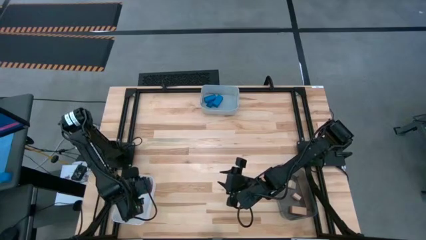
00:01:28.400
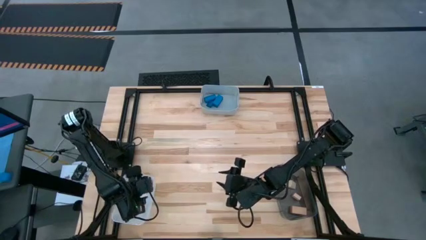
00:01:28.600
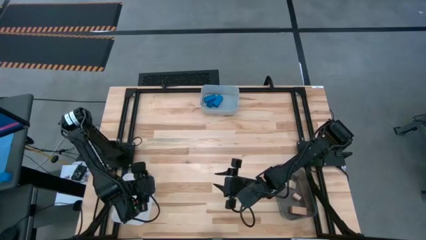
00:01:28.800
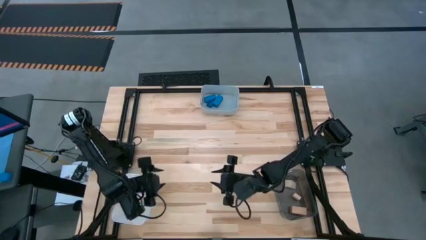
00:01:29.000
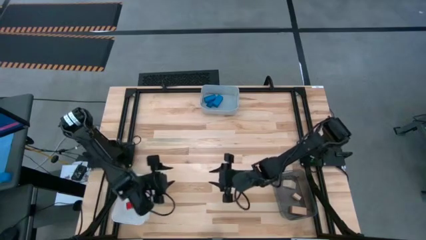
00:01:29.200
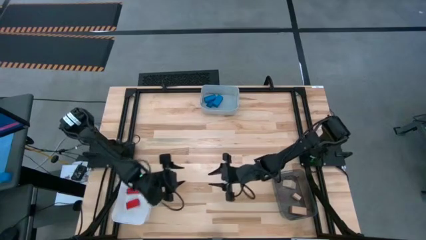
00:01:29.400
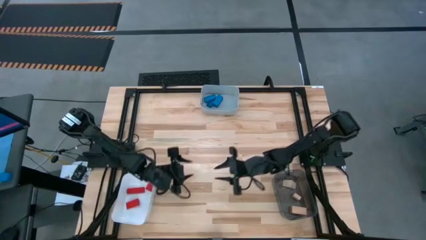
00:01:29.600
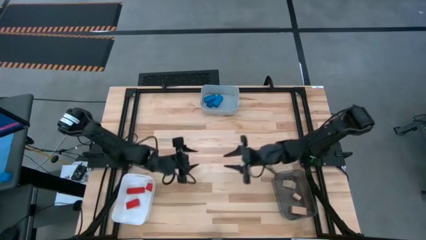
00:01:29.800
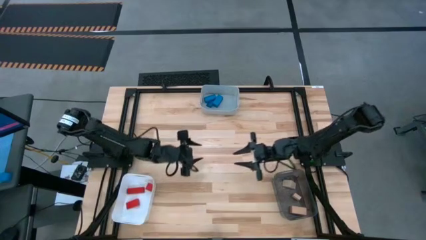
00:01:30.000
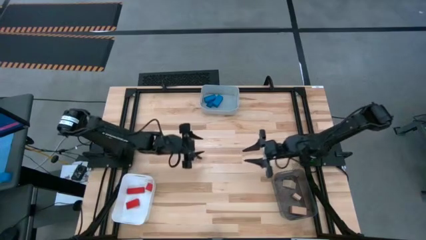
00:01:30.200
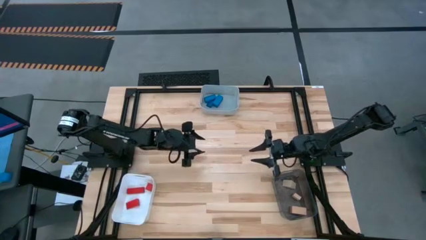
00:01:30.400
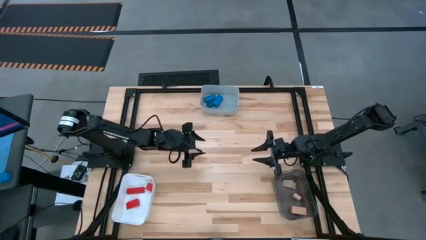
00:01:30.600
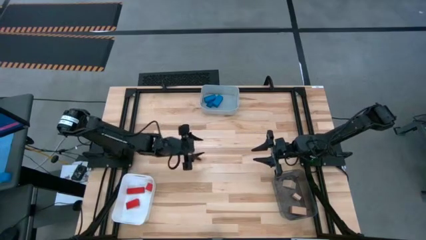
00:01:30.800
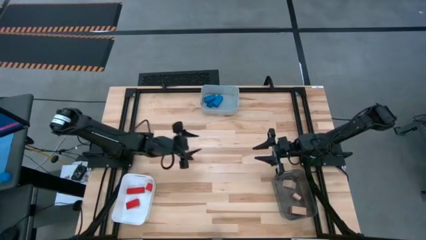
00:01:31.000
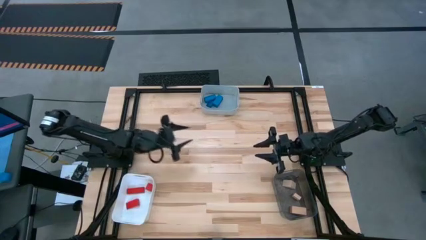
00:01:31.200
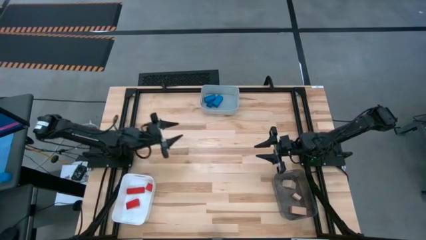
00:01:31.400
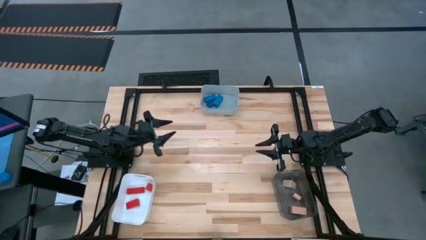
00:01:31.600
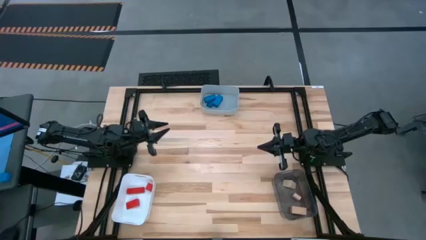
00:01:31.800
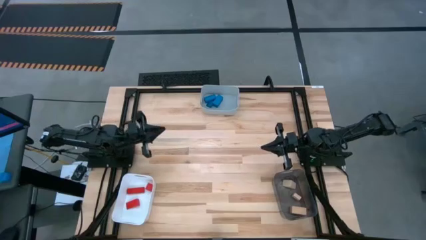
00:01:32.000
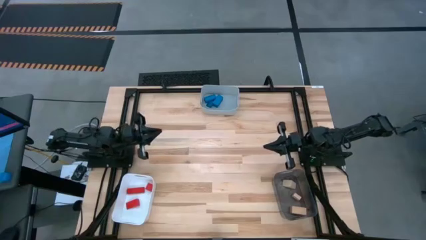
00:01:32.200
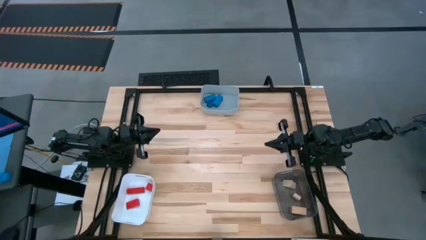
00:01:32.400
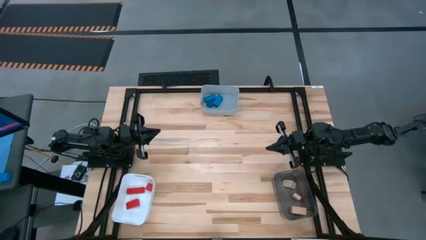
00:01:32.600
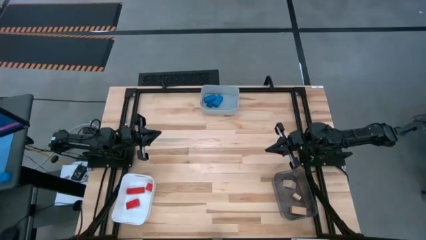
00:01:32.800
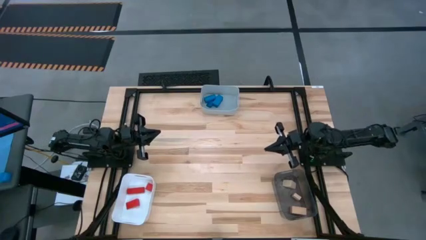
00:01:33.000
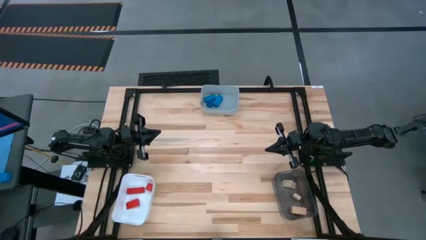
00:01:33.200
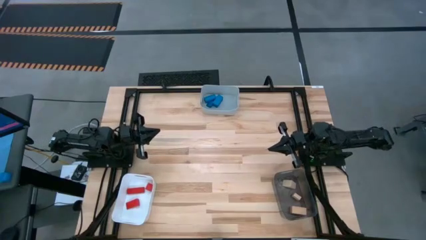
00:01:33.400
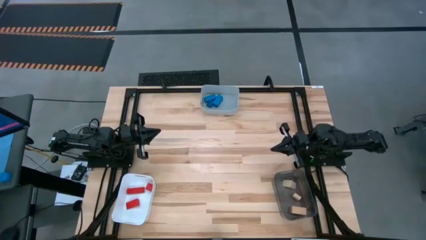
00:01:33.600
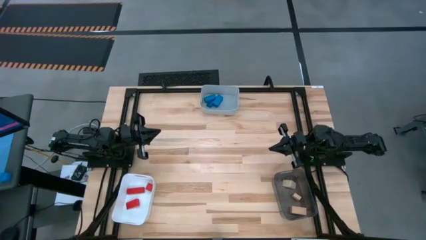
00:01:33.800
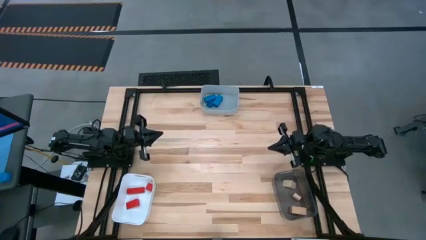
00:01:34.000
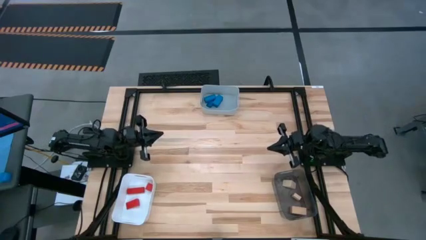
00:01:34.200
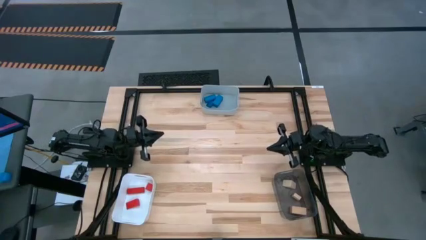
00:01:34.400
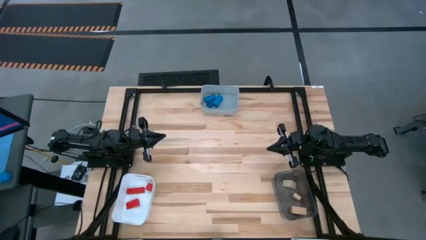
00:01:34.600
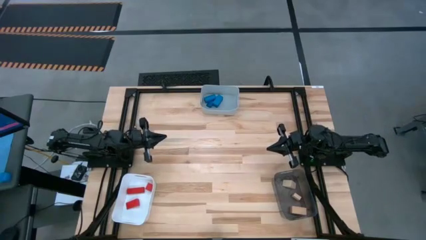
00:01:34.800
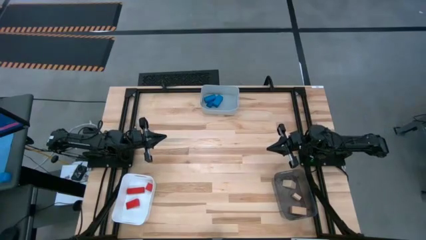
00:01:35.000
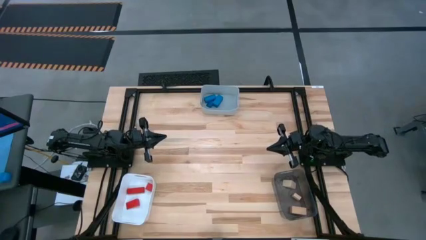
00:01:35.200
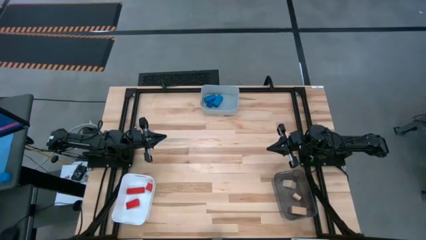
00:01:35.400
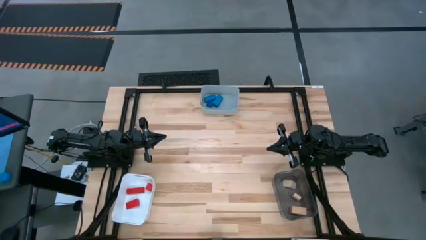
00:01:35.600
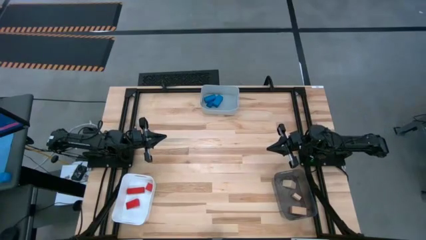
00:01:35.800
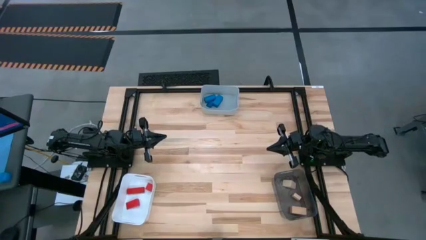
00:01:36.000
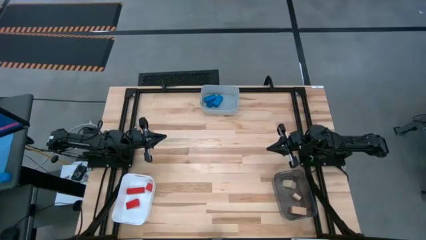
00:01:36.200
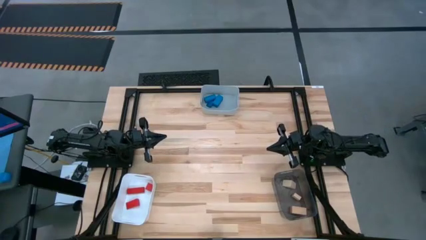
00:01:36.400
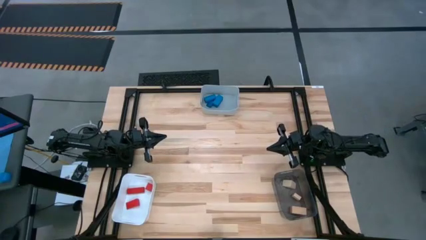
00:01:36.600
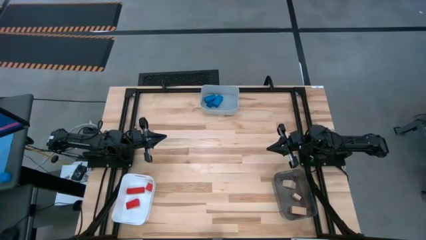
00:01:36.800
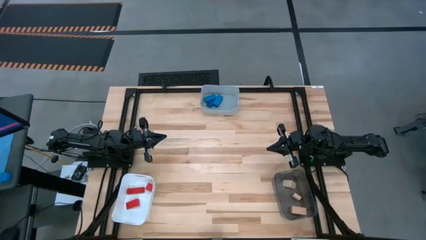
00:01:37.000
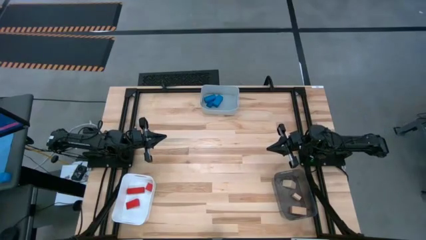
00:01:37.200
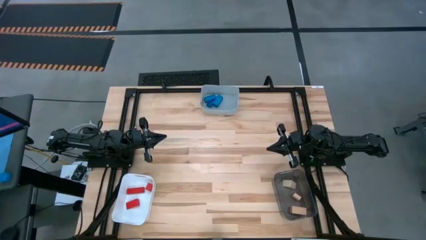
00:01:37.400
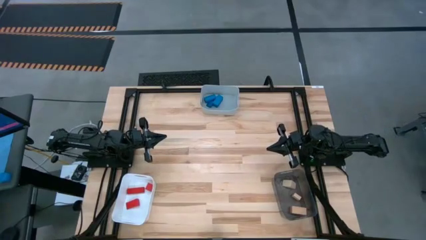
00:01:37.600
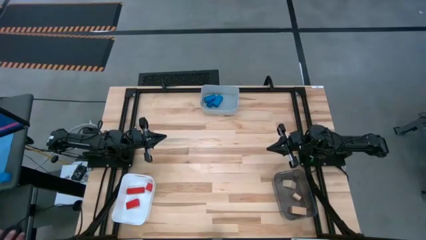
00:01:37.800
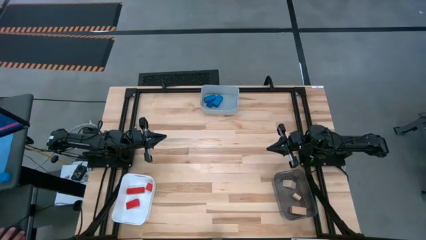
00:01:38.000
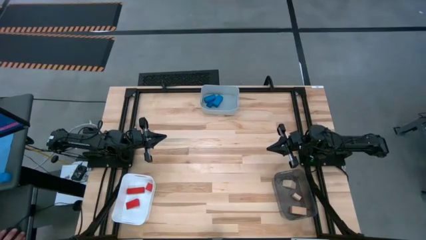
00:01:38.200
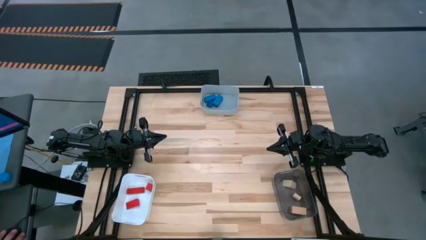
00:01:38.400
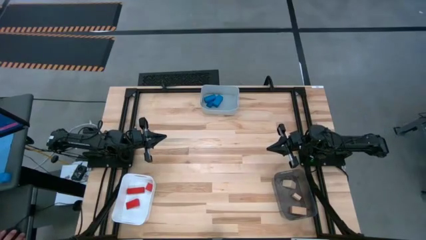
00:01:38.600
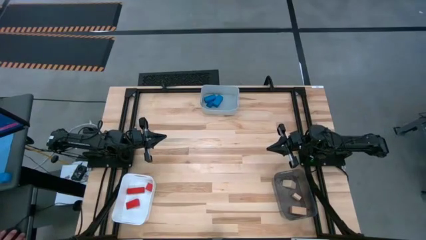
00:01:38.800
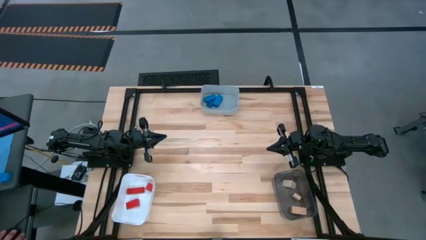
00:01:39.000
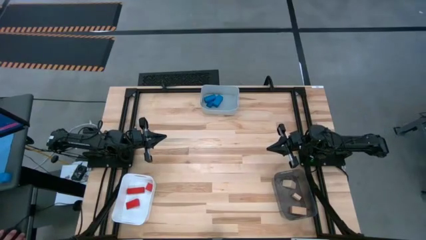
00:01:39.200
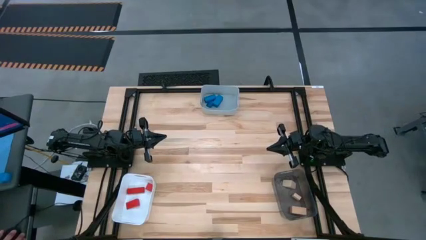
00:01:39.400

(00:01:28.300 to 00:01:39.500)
Task: Sort & place blocks by color
Return to Home Position
